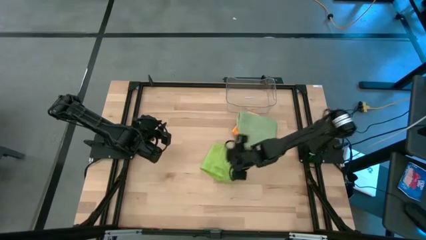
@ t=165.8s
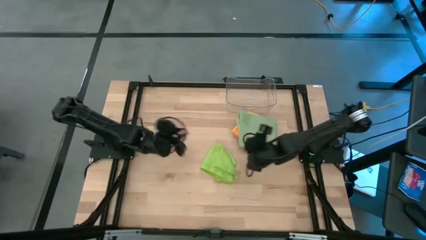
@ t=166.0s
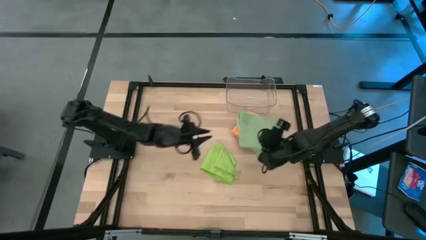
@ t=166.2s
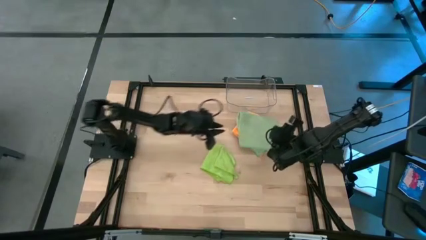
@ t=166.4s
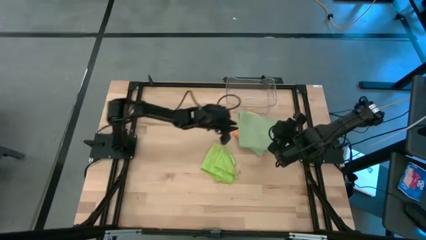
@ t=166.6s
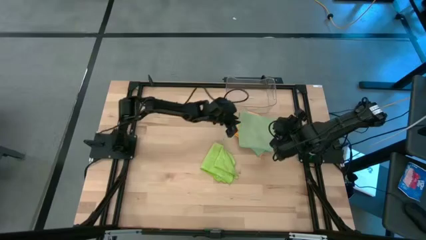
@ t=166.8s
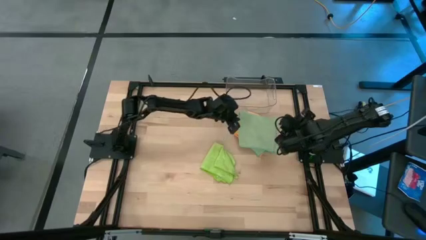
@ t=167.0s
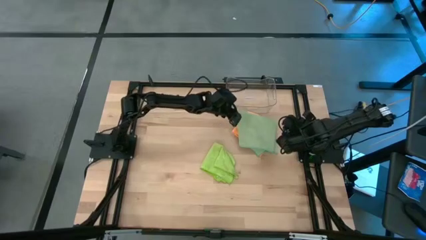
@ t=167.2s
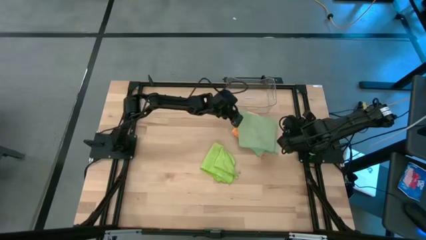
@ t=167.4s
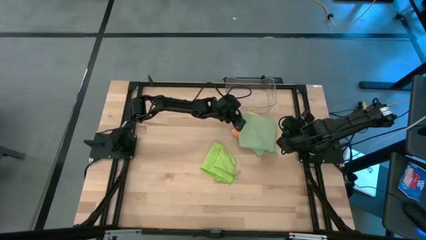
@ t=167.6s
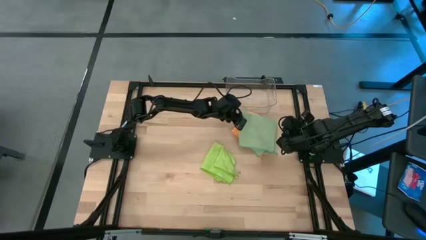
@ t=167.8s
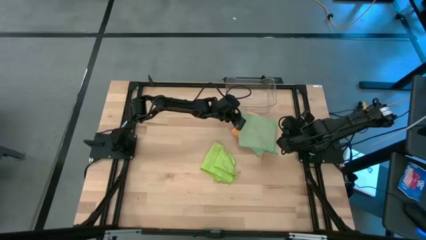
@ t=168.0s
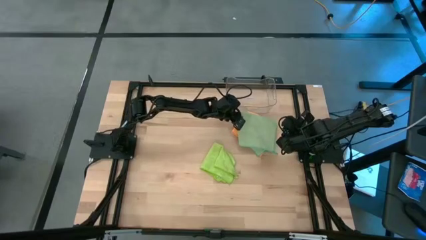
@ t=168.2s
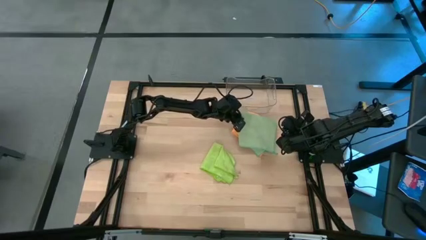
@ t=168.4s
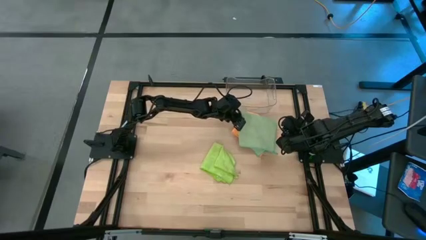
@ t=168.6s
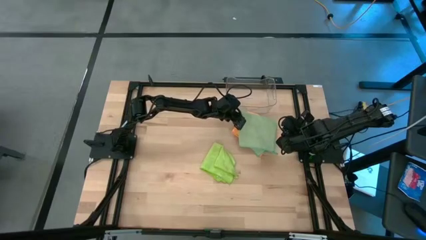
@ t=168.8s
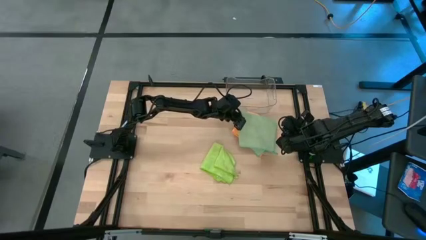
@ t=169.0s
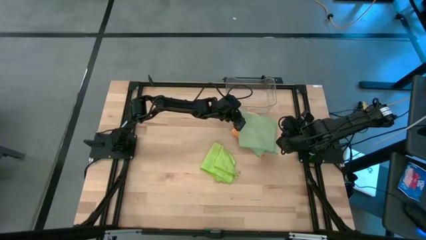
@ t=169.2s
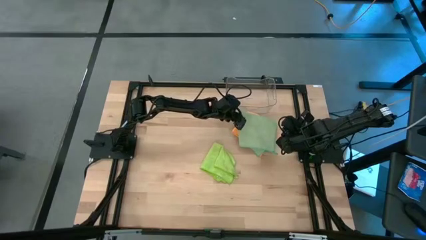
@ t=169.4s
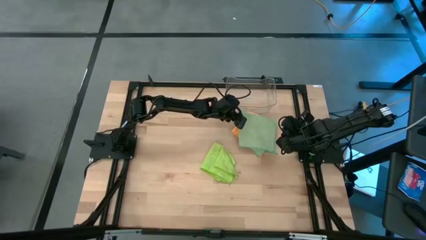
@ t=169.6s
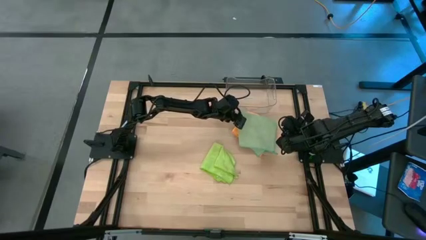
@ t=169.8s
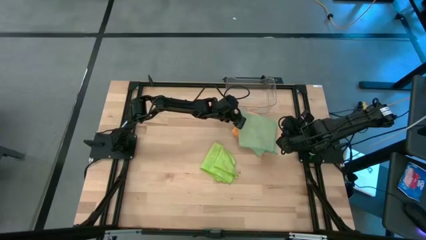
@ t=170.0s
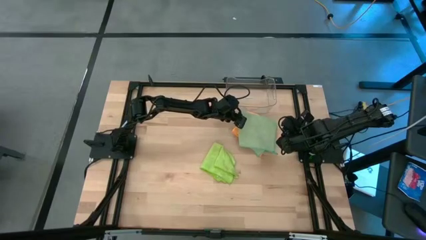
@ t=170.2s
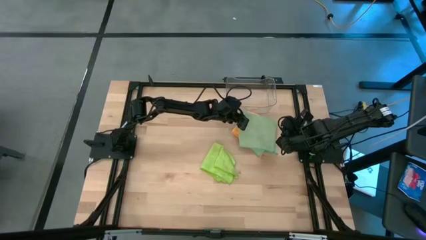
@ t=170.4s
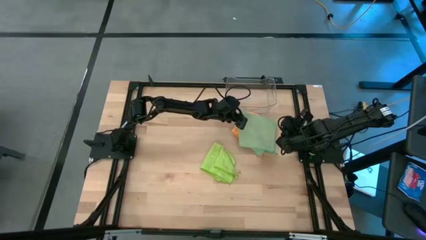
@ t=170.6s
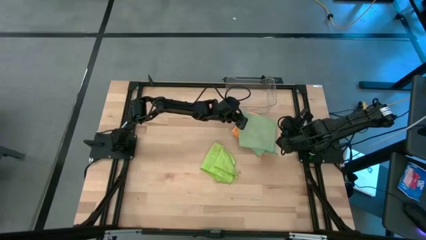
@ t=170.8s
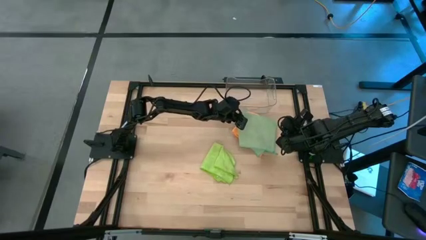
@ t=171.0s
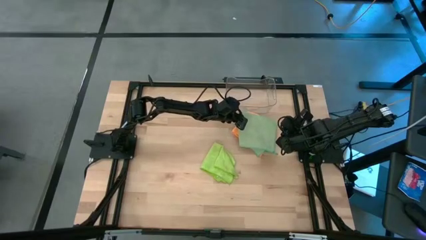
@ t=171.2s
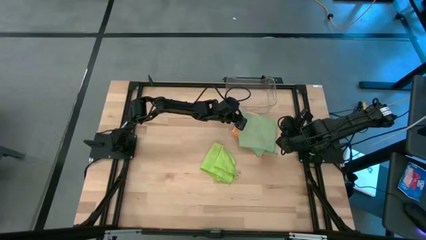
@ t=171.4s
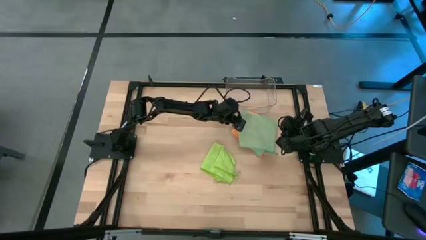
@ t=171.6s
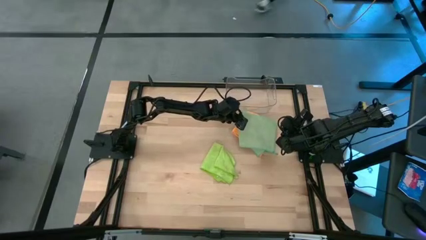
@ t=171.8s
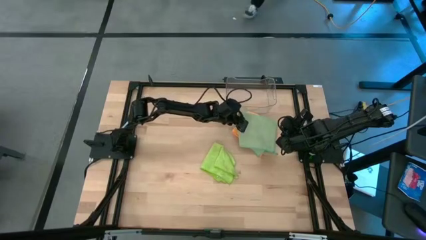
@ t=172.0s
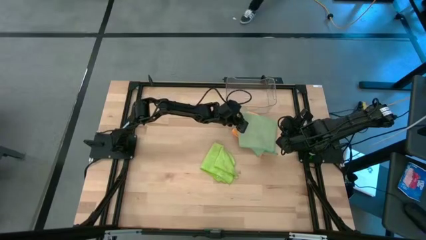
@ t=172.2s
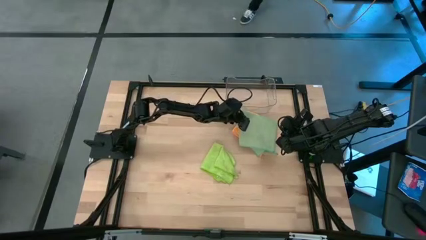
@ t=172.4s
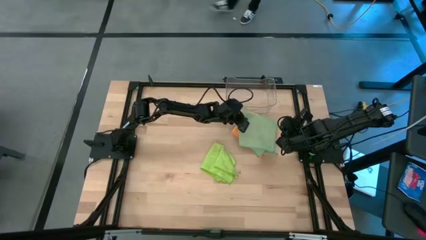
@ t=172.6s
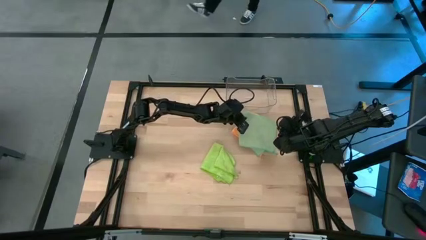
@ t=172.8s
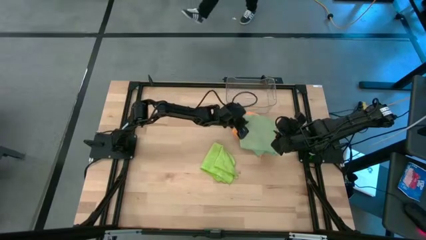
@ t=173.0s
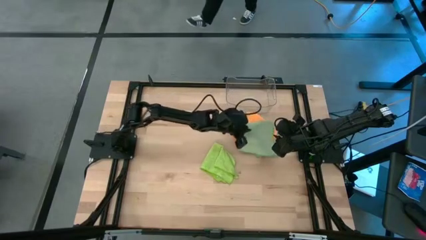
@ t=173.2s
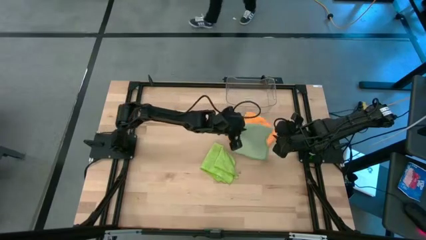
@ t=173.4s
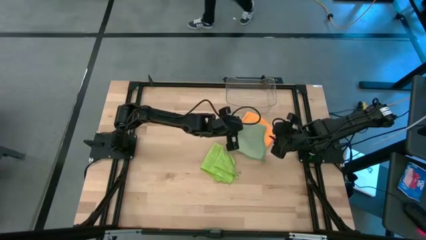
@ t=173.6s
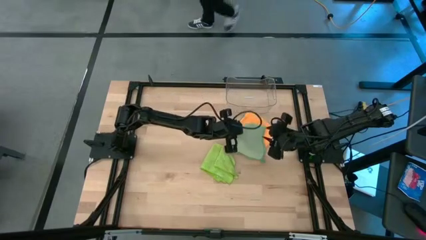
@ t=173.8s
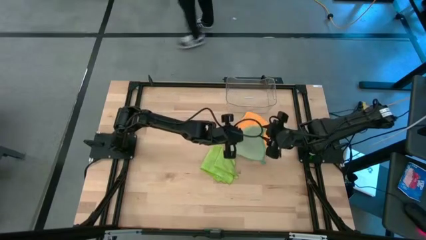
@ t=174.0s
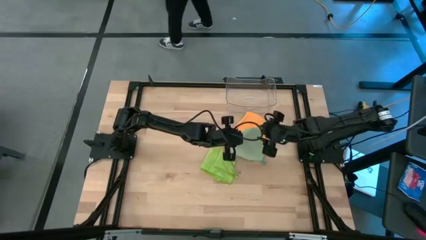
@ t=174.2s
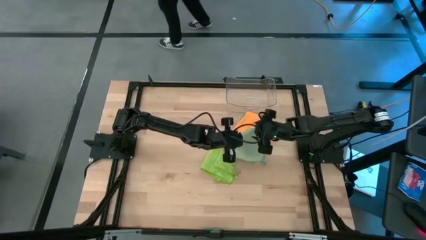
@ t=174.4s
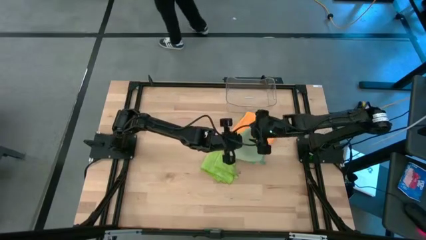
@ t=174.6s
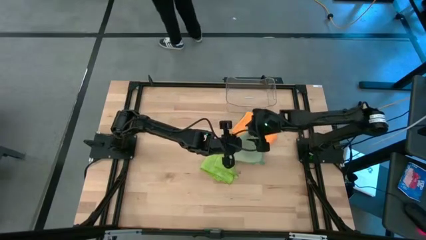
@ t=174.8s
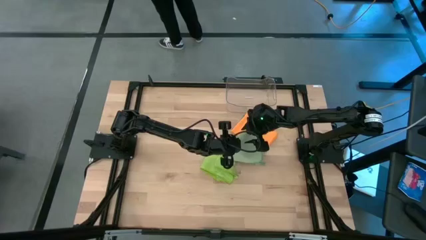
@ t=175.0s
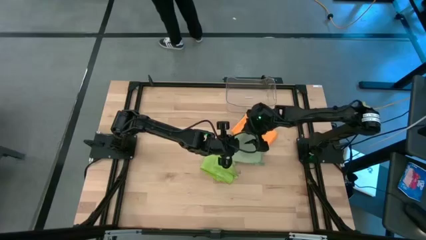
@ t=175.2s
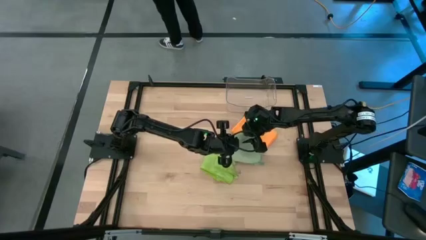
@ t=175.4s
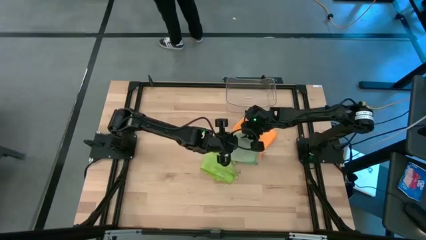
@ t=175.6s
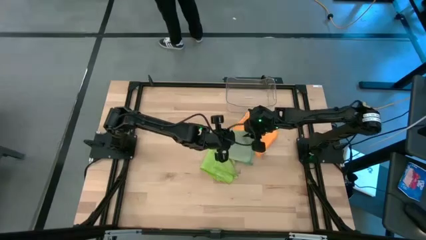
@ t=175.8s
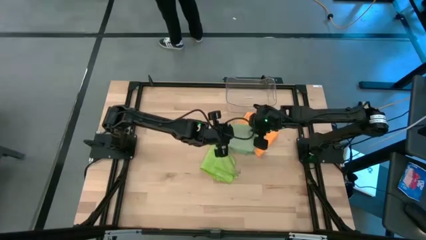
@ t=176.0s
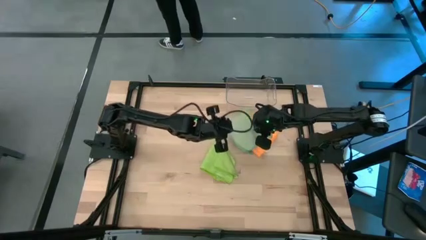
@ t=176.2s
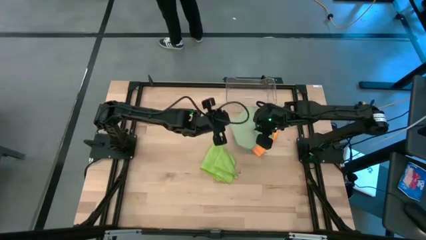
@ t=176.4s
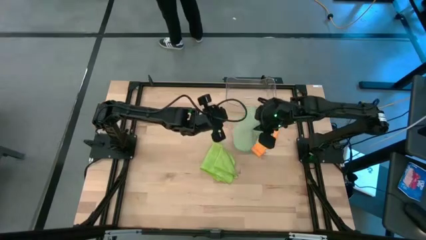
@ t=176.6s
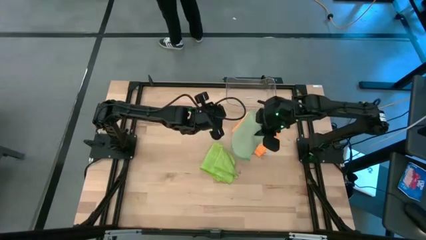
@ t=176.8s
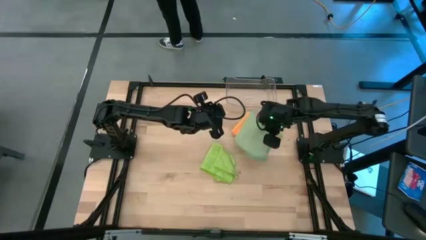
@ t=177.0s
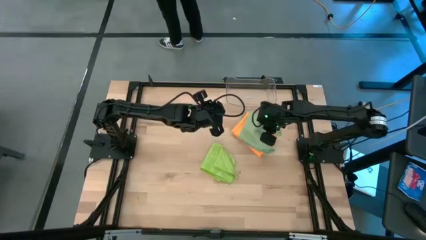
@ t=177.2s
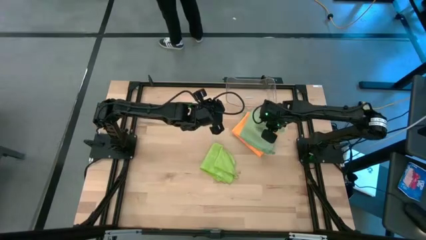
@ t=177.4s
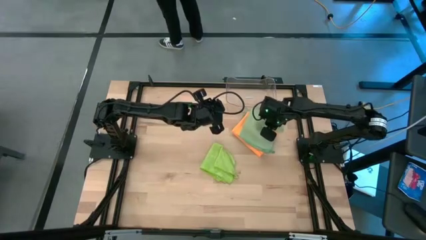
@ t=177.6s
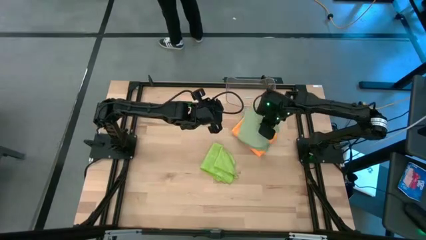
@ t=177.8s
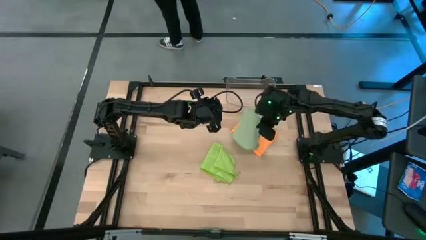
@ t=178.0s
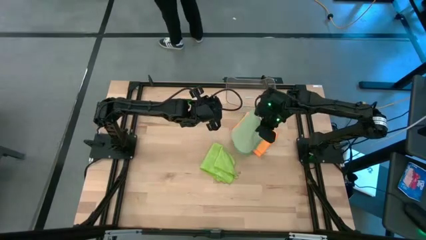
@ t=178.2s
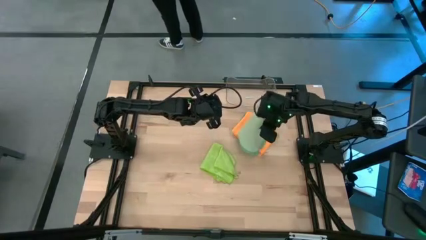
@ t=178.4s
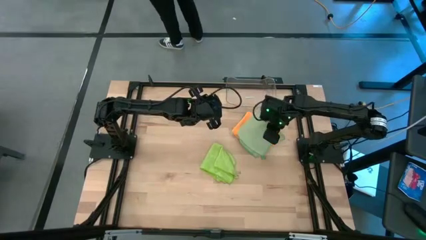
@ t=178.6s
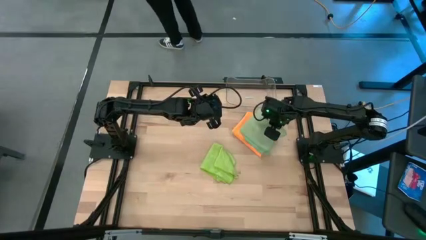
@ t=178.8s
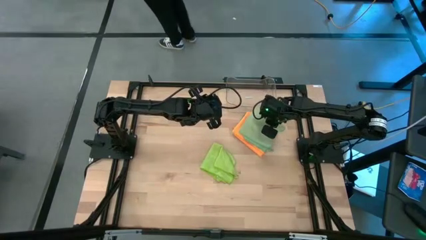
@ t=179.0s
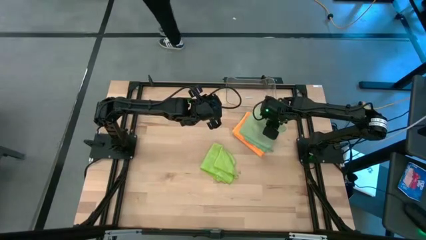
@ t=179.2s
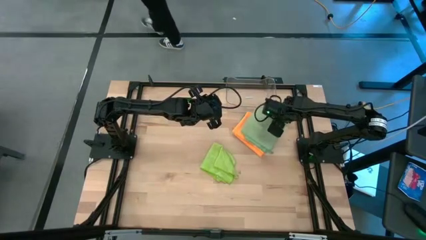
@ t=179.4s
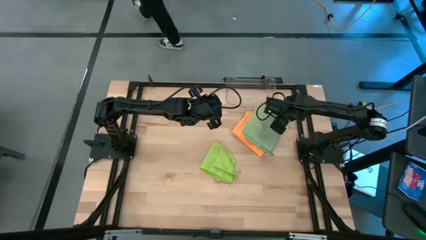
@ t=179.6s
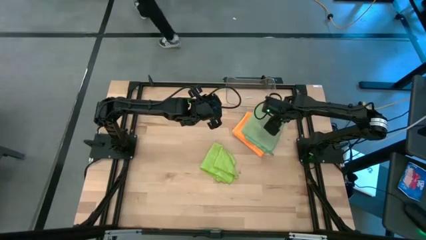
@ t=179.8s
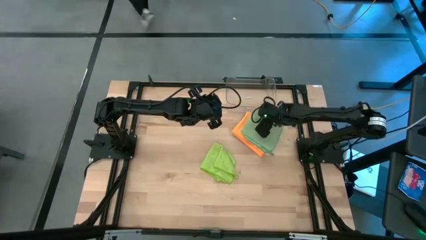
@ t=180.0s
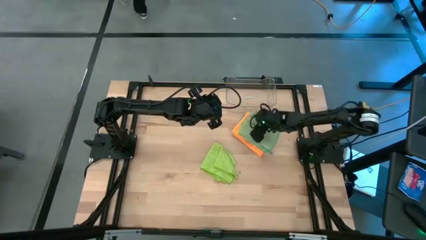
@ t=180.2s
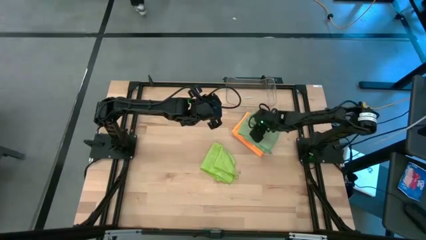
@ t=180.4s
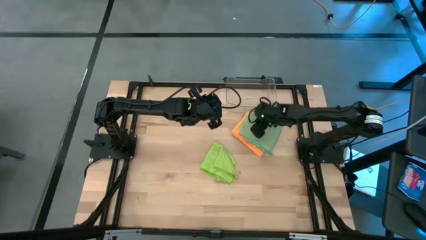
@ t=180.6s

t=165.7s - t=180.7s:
Task: Fold microfiber towels
Adjust the green microfiber cloth
